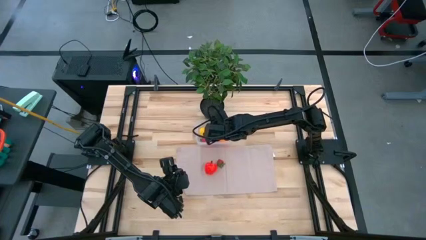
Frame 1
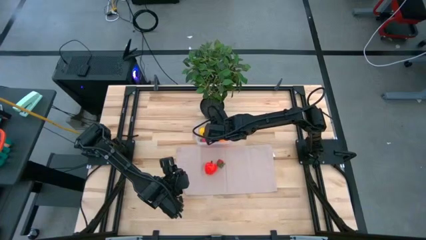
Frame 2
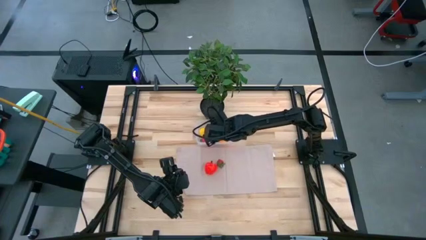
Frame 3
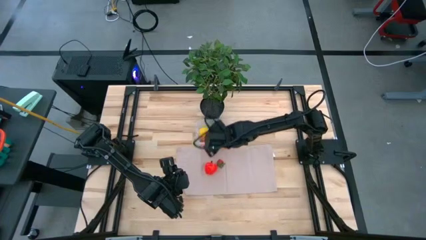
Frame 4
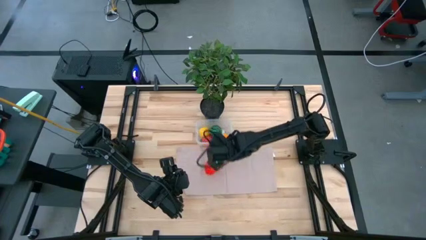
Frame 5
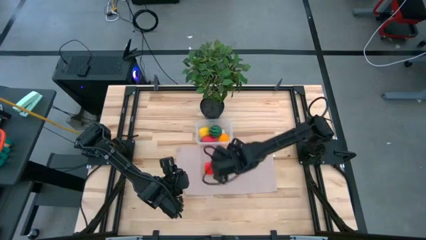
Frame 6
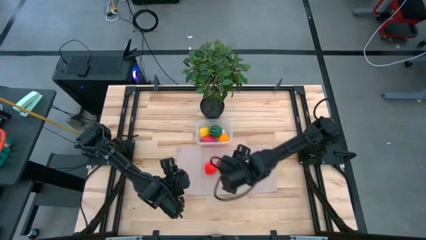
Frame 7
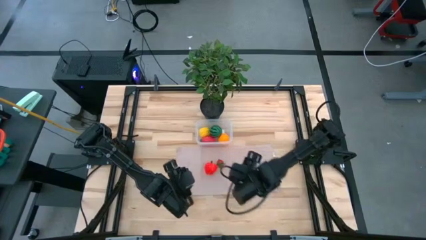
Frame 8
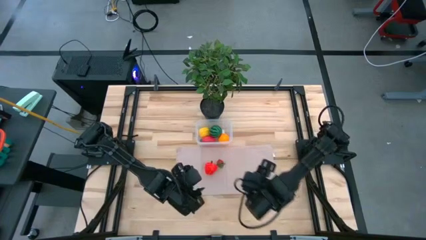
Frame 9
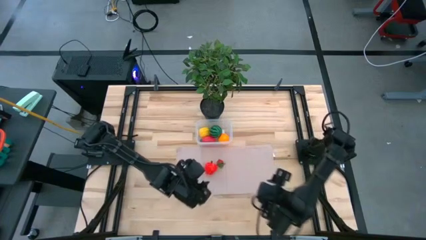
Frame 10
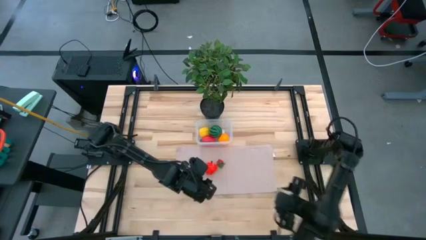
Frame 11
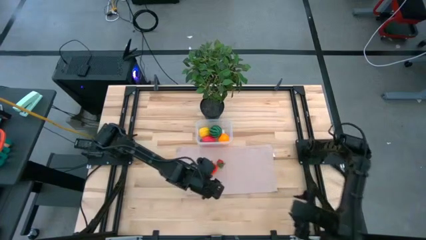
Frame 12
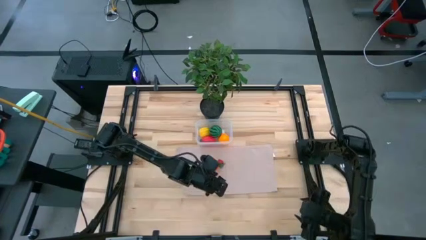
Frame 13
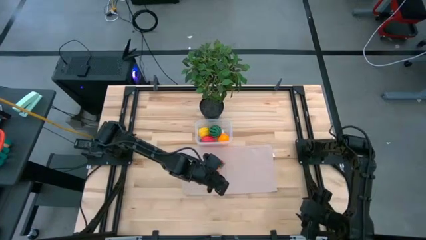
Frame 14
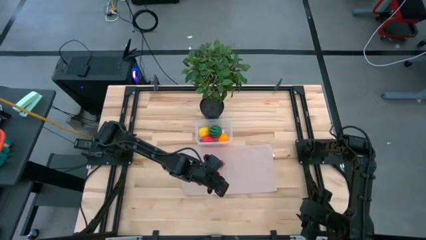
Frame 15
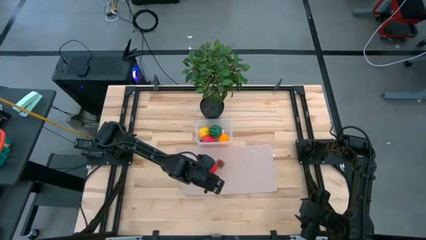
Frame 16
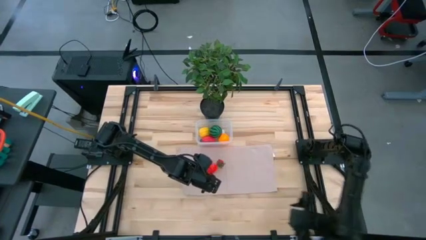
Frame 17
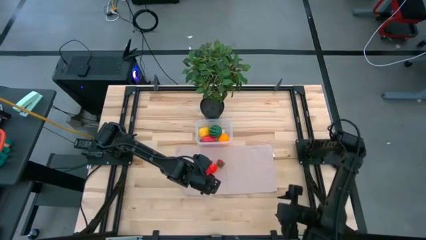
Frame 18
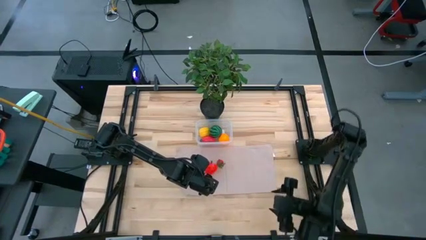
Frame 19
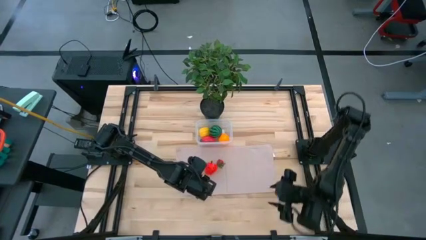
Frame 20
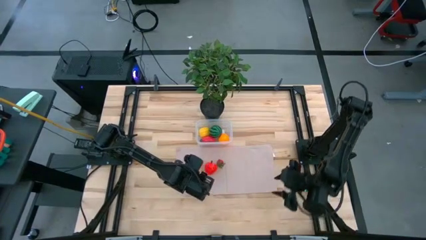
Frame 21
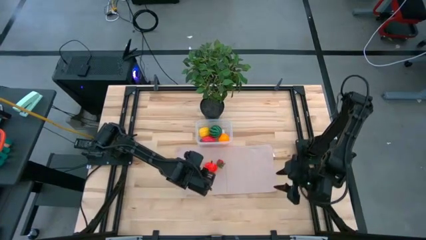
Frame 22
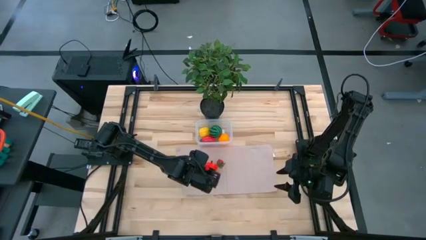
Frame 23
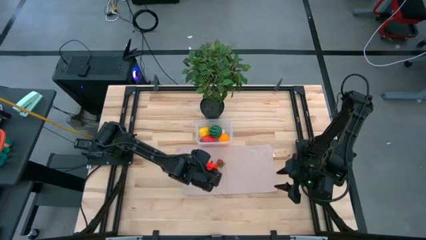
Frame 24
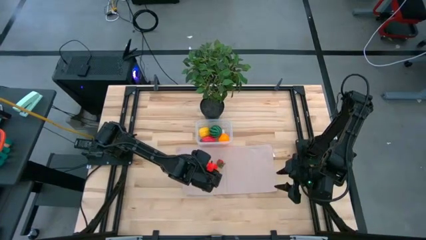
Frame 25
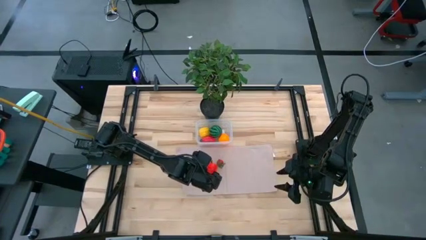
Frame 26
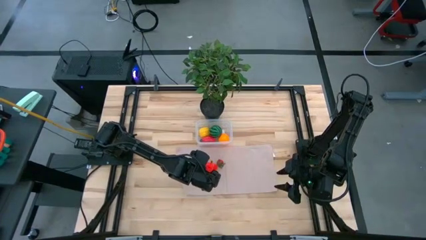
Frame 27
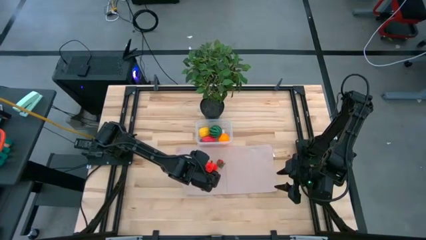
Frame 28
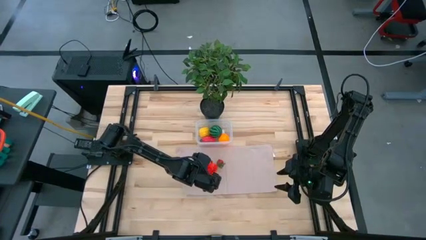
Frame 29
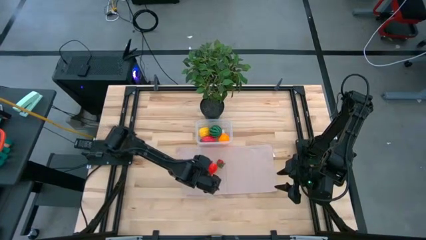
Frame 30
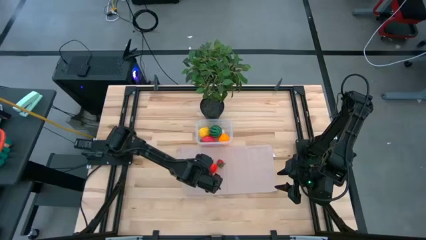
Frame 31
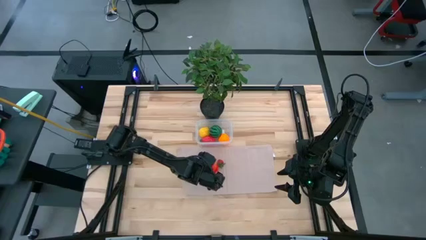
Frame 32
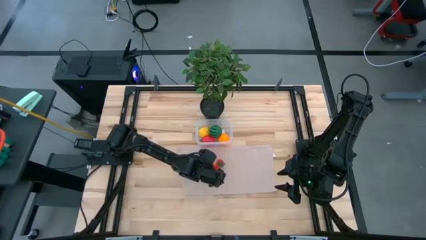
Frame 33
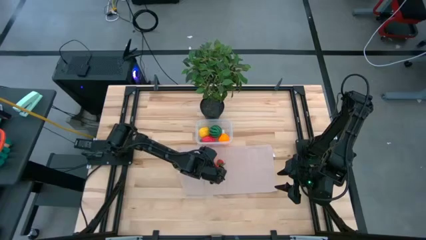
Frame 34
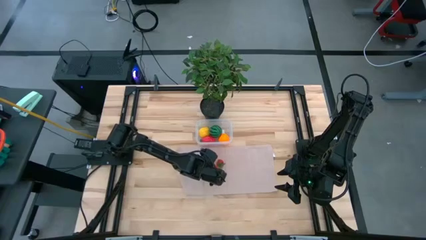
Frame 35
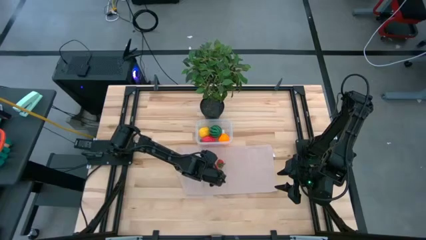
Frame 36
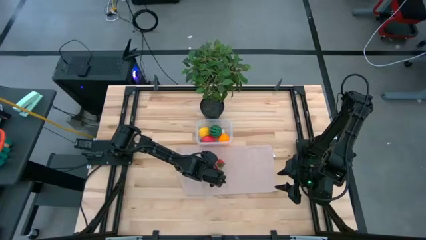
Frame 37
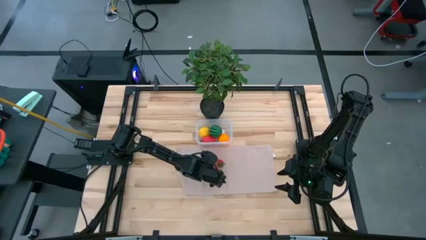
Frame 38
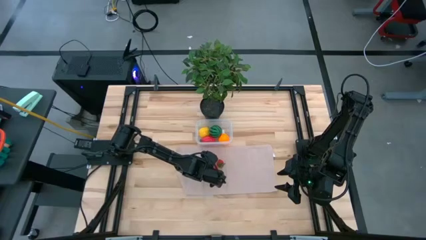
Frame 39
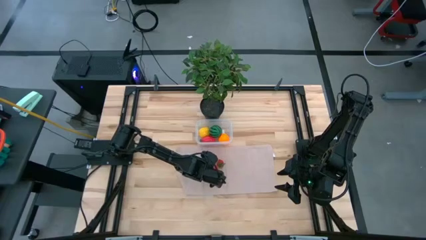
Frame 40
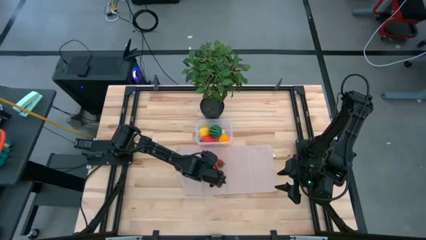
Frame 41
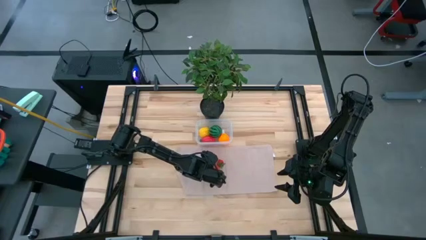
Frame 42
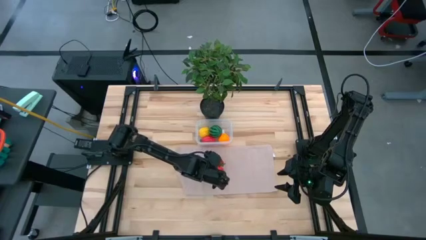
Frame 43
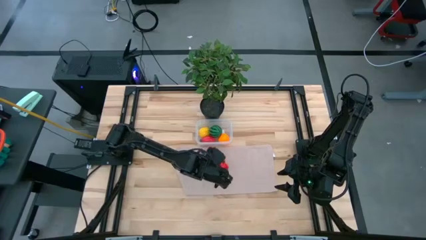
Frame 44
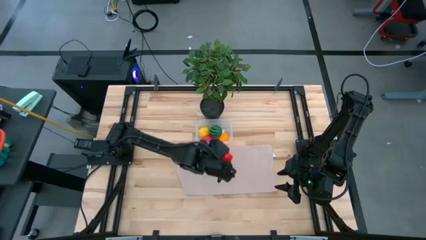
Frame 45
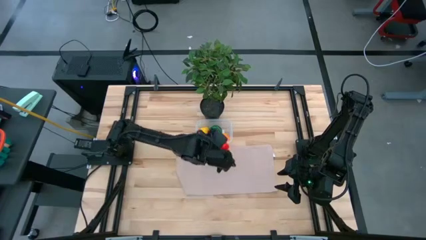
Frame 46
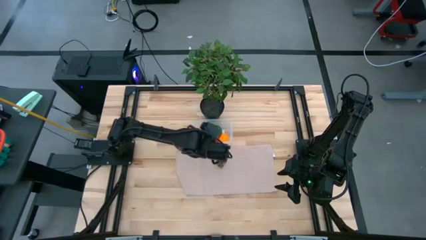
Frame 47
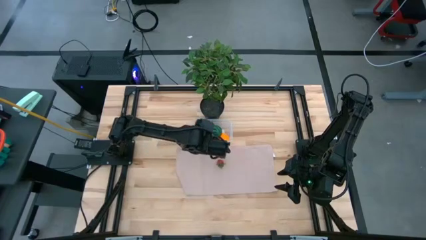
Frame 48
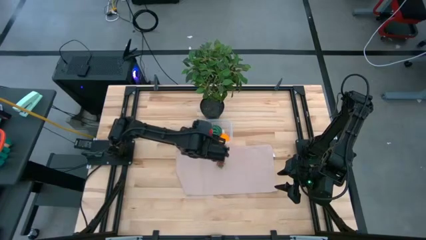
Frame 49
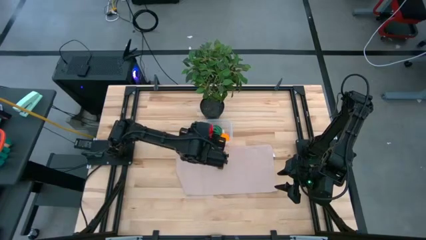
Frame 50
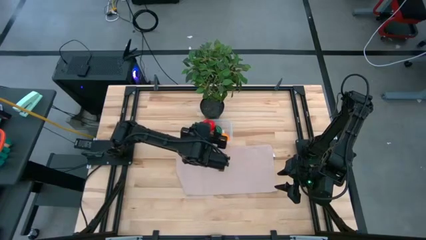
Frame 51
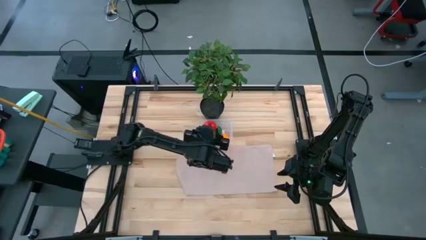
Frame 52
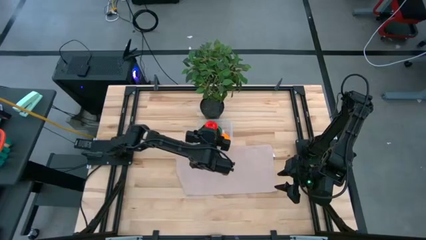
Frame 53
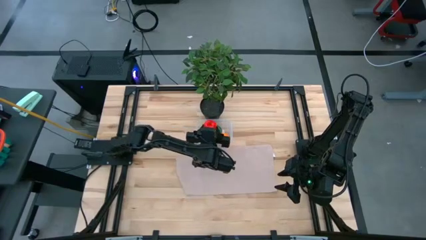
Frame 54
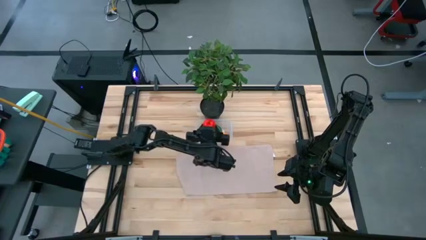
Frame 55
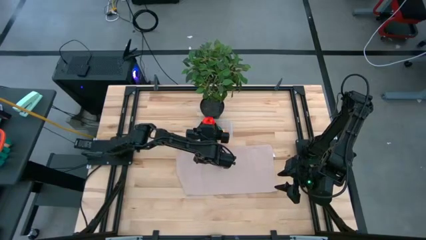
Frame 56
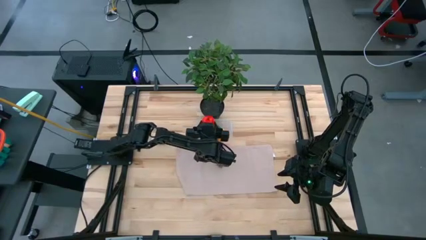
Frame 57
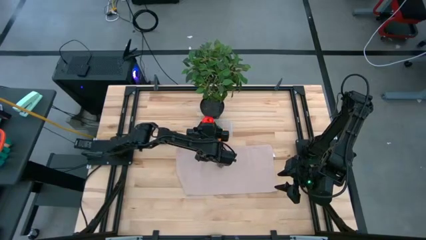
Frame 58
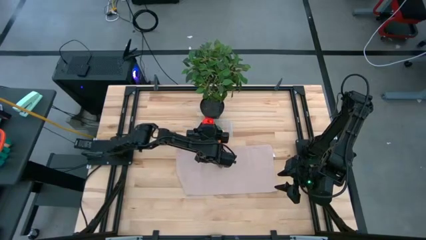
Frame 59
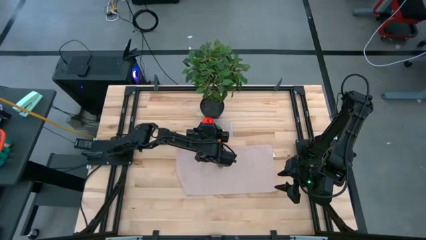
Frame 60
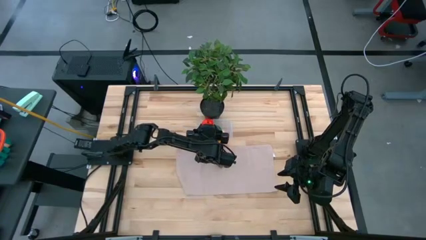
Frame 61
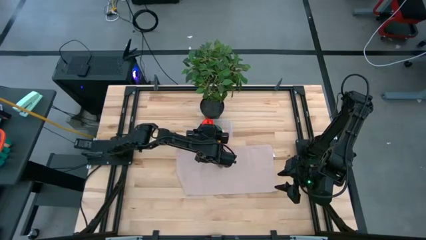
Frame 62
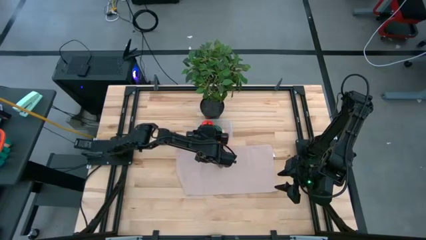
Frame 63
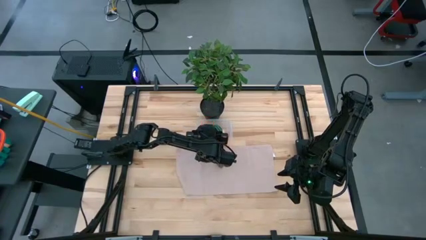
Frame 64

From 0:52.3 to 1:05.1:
Task: Pick and placing Produce into tupperware
Put the apple into the transparent bin
